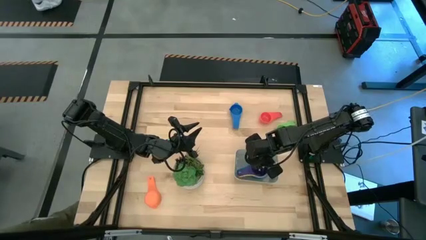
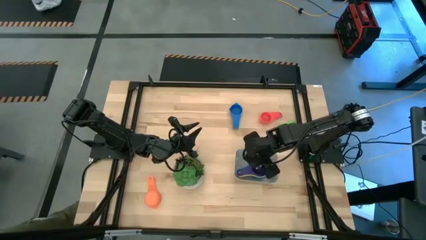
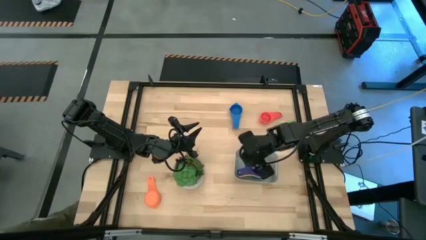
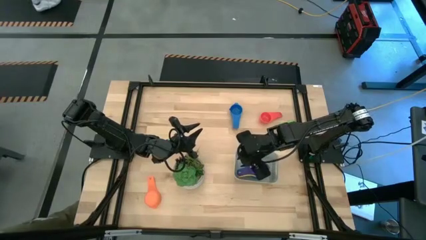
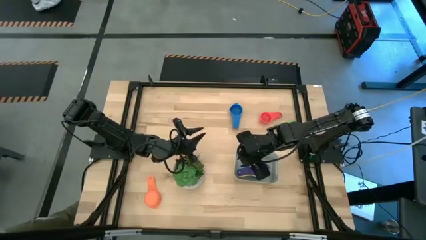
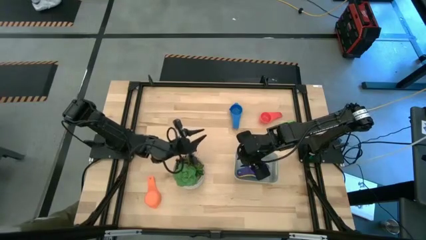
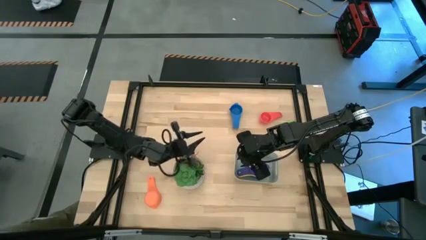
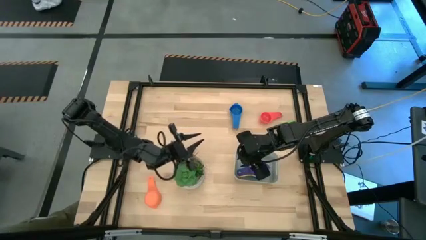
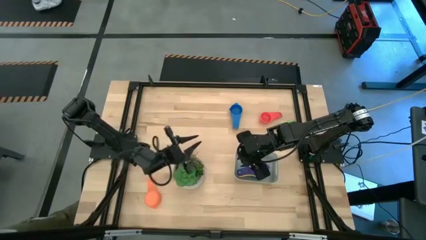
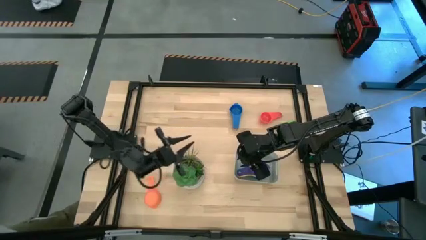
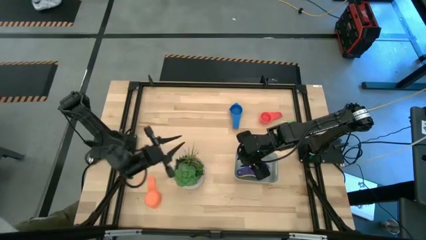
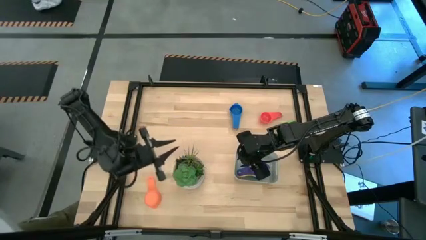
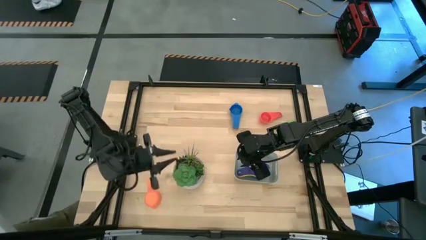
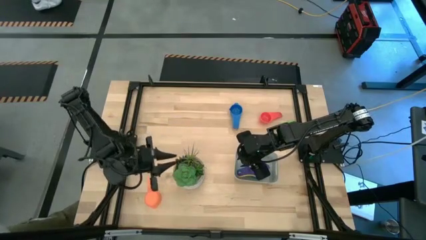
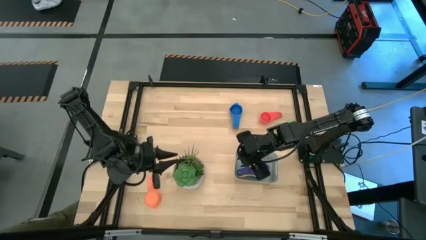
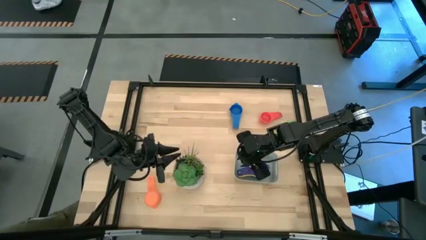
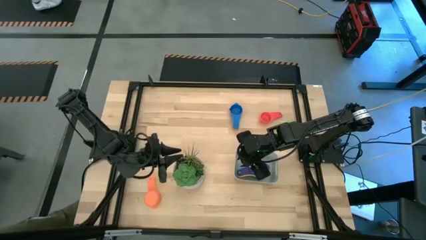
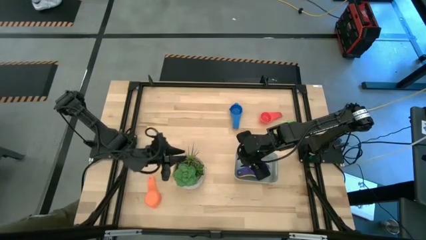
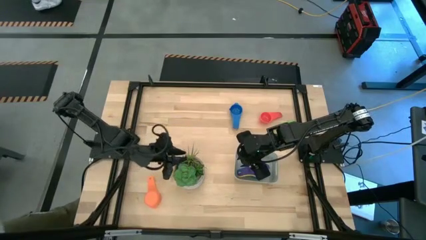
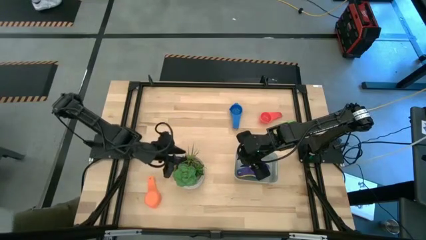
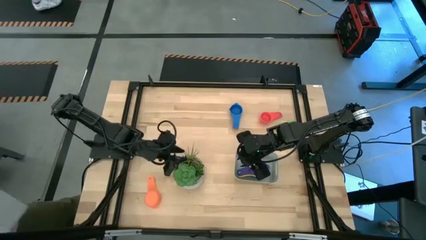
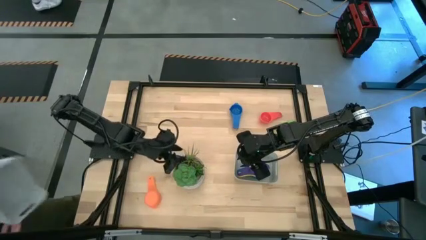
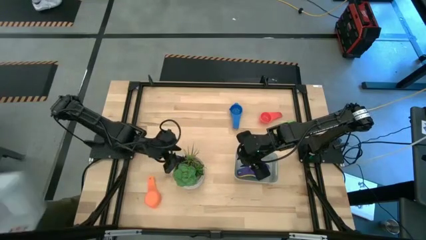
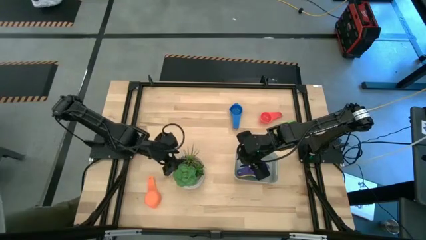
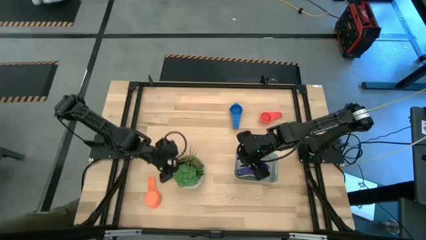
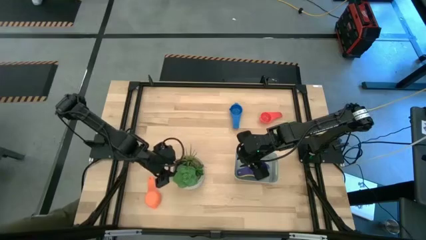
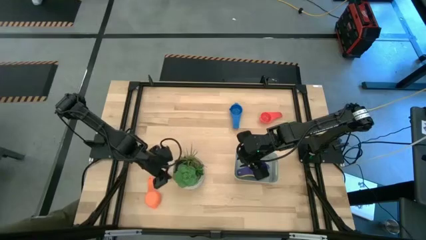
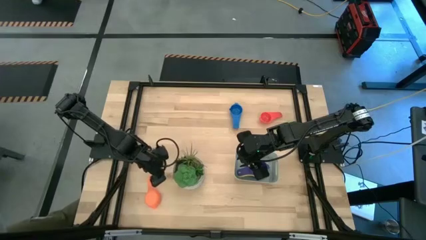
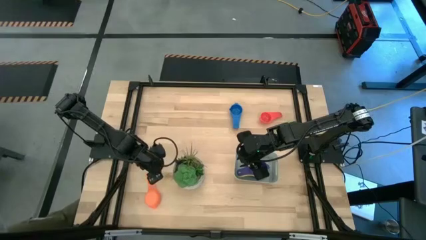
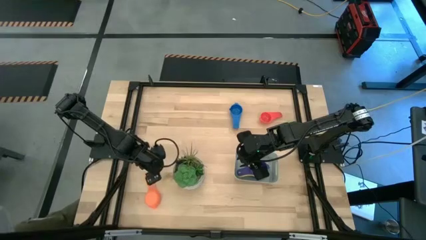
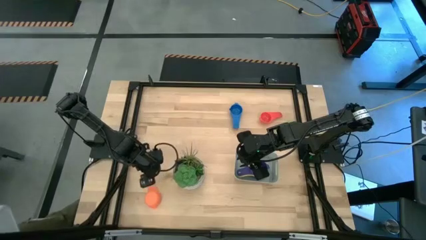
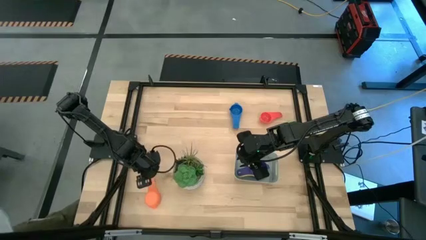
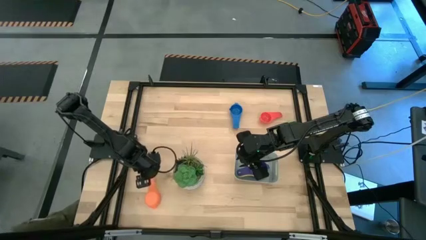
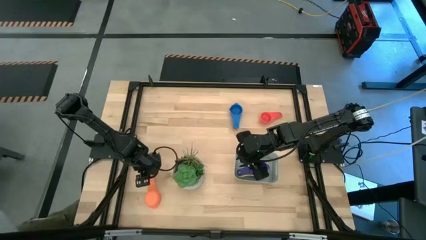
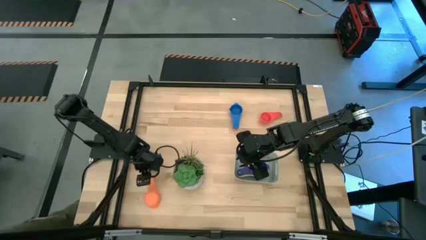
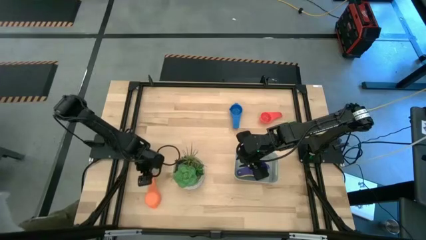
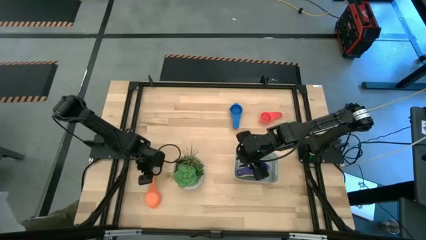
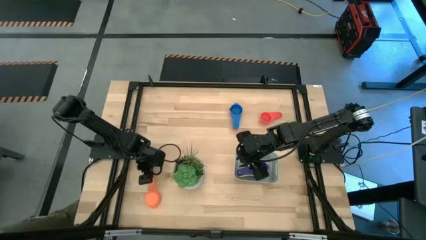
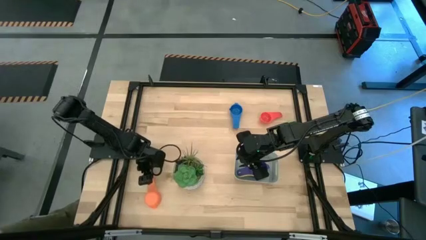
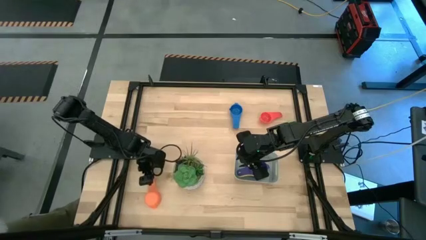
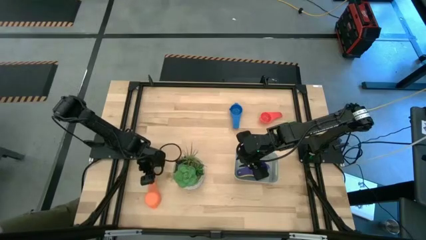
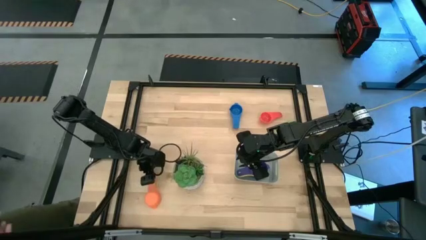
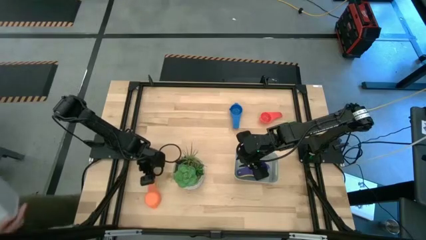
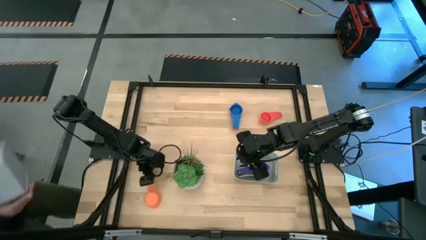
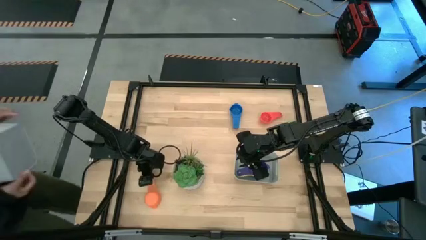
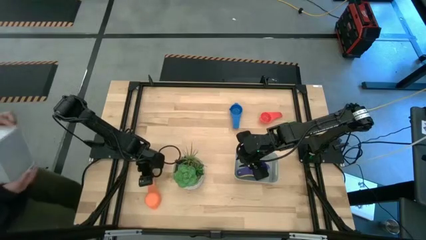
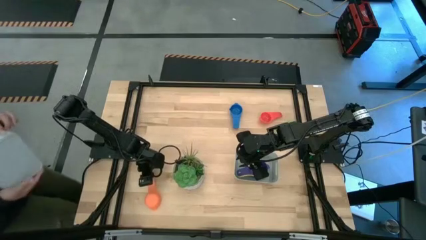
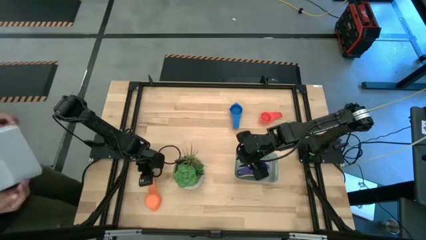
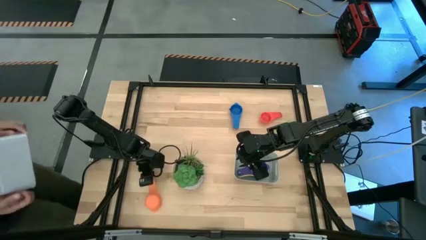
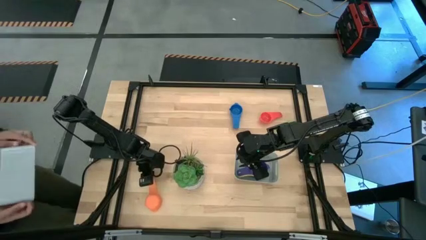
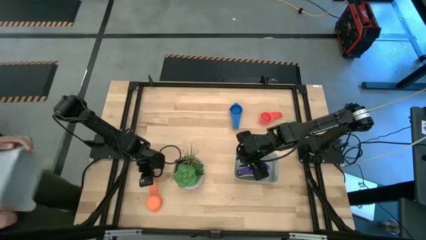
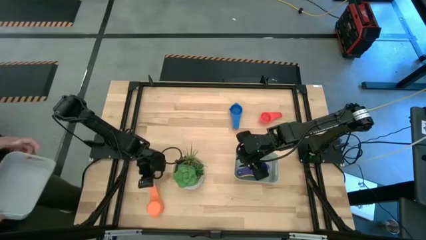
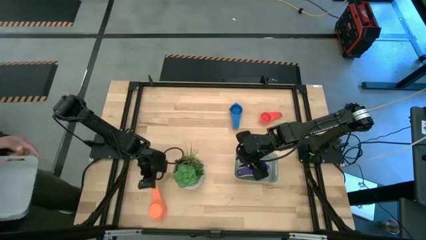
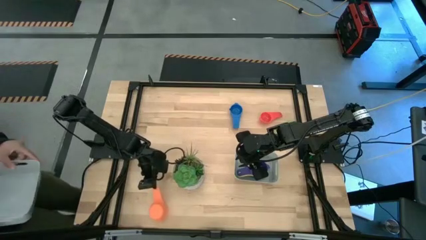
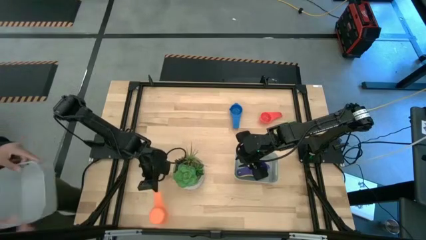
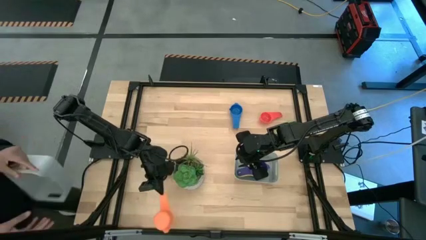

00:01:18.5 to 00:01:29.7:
Task: Nest measuring cups in basket
Stack the orange measuring cup on top the blue measuring cup in the grey bin
